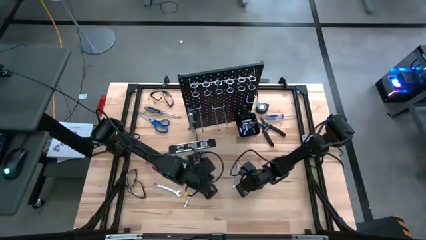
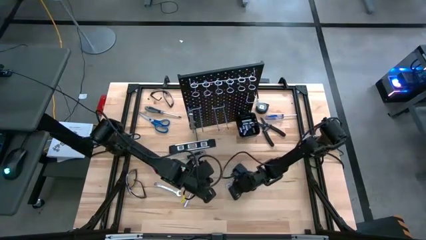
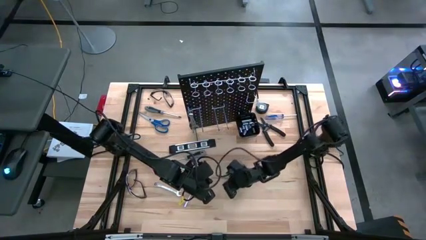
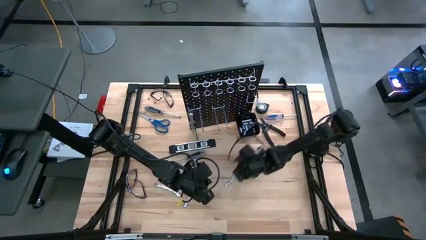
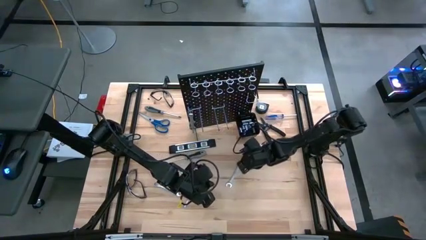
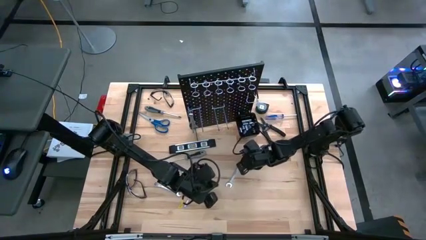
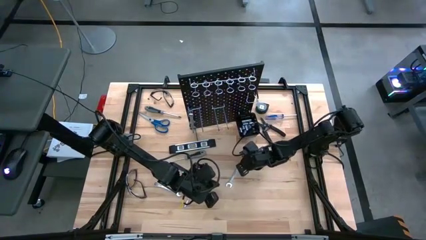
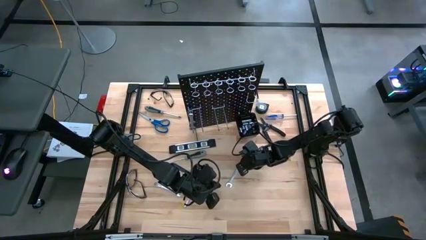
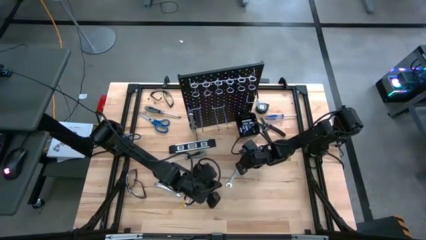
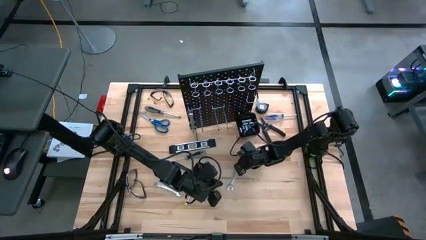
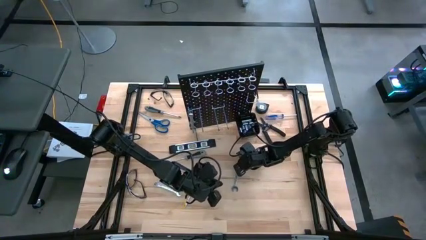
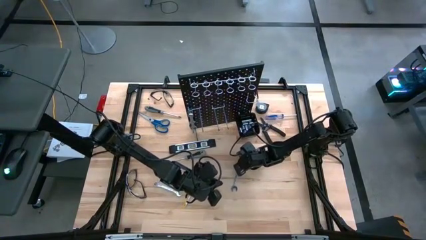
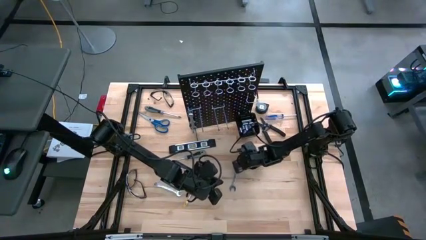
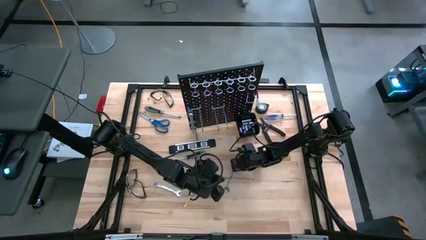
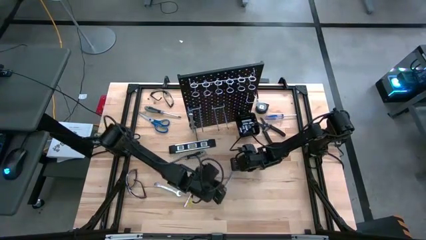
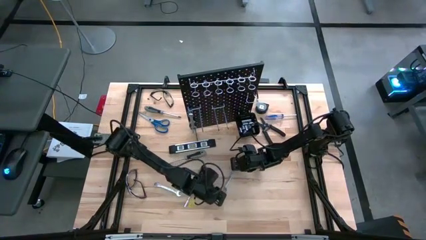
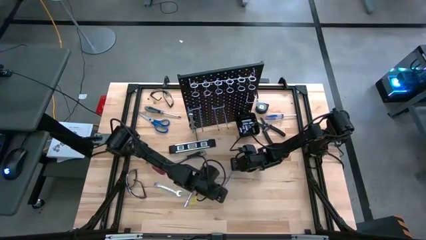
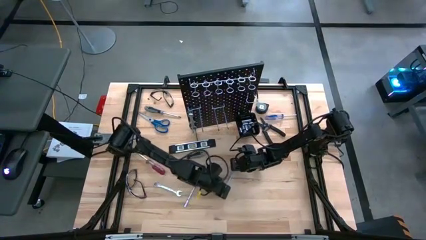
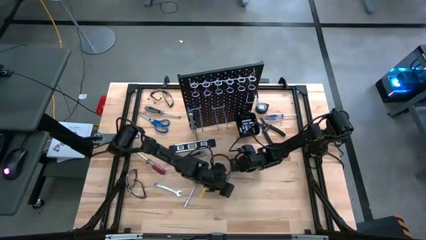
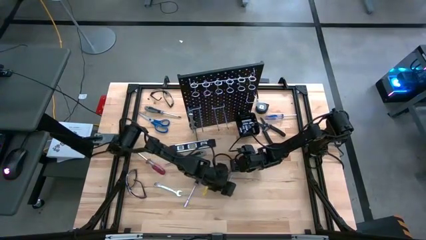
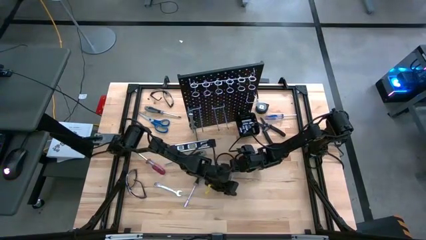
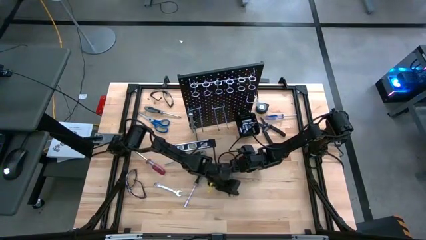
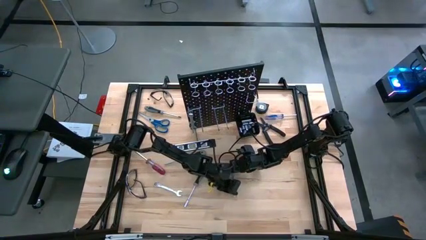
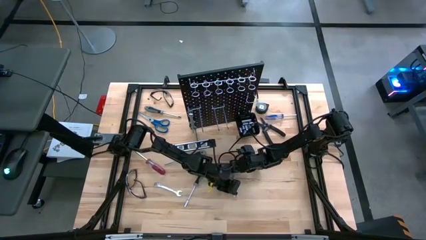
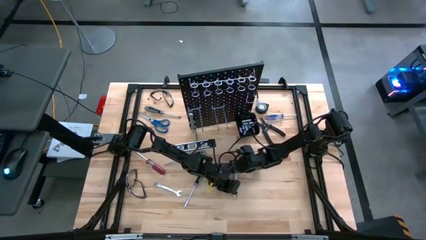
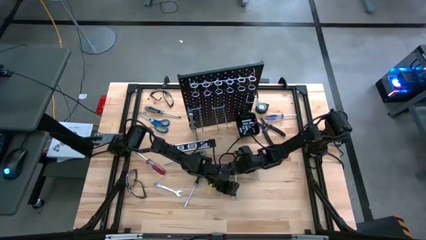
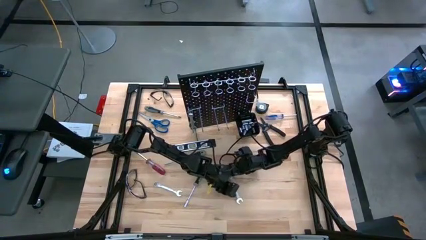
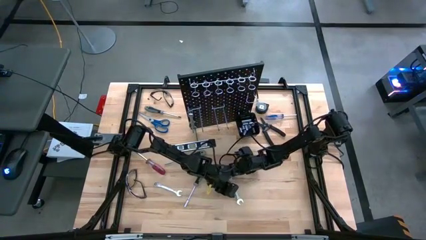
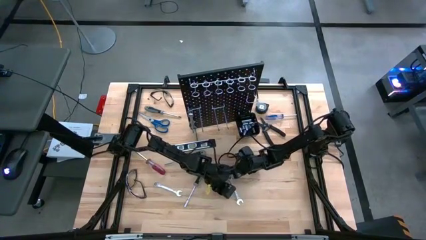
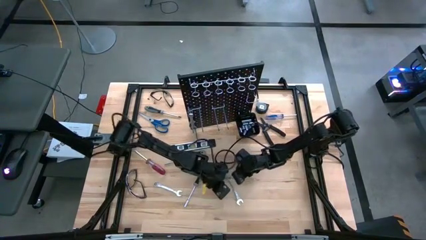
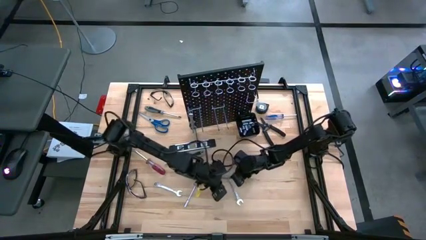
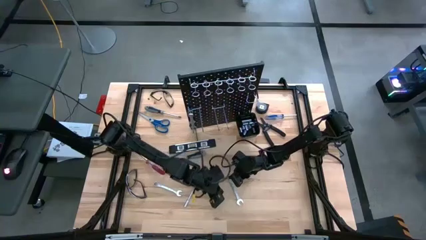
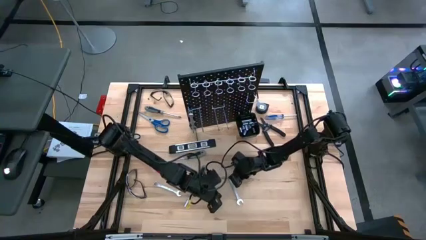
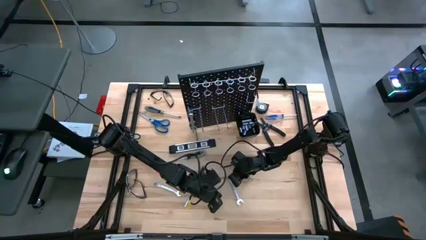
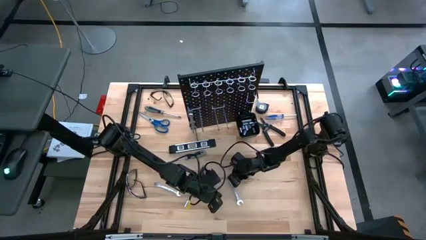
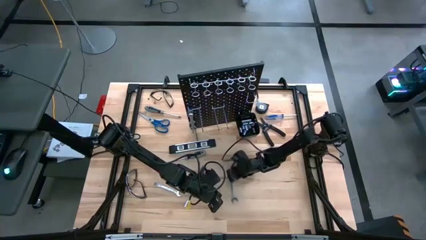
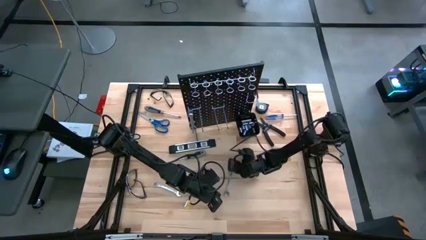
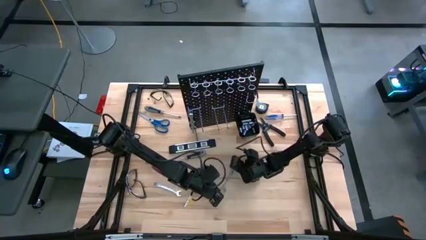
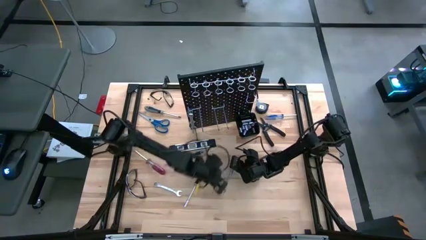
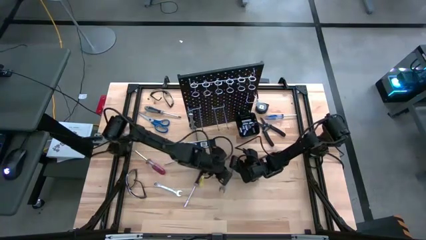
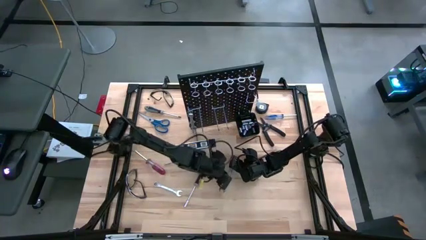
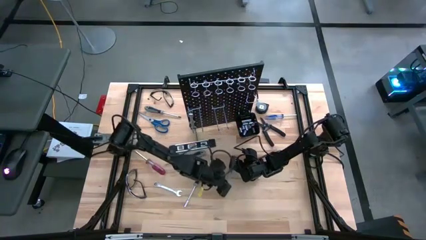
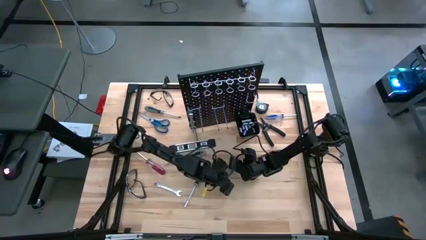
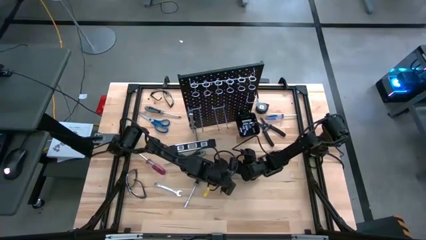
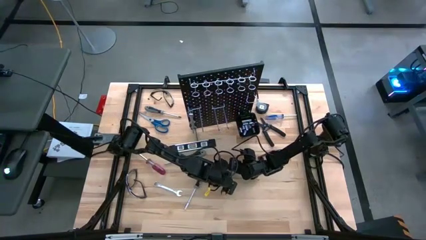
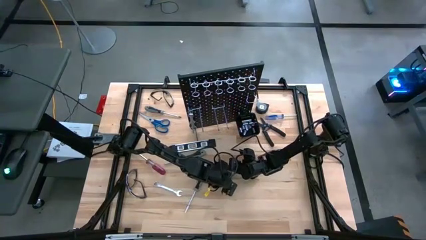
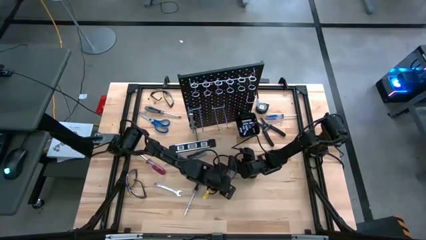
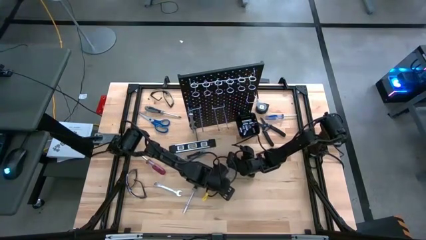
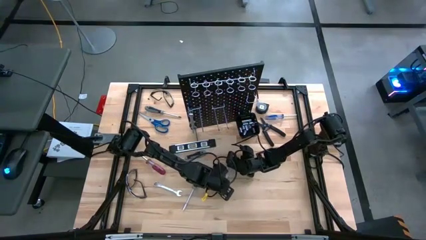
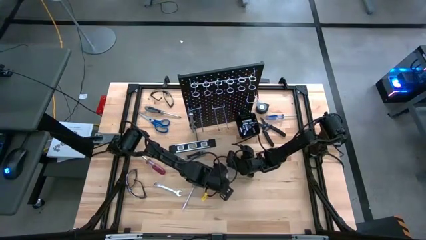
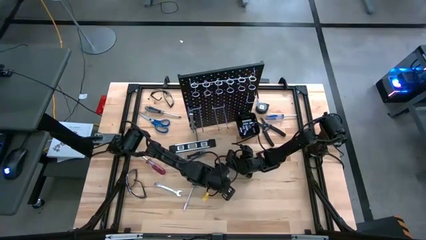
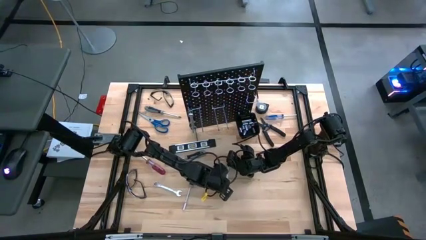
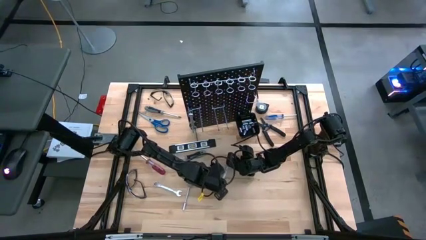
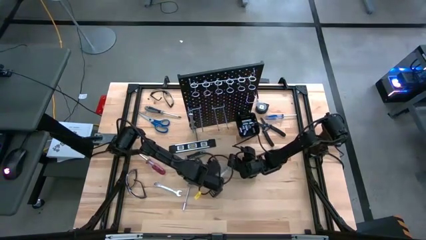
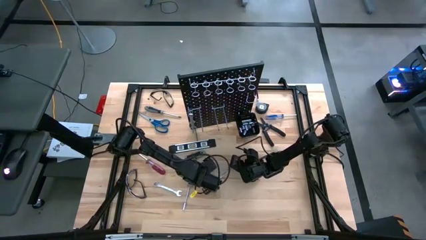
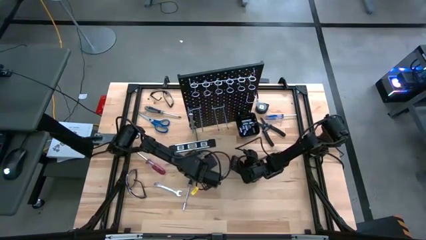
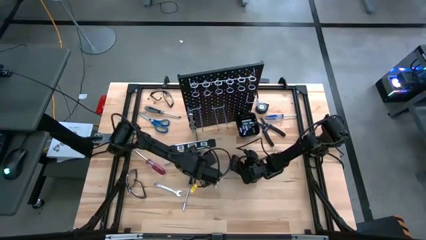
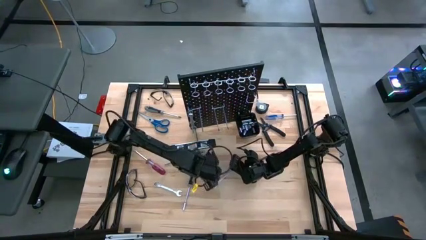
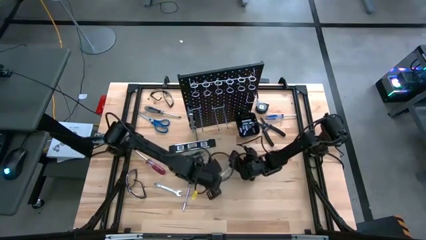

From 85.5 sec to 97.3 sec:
Task: Hang tools onto peg board
Hang the silver wrench on the pegboard

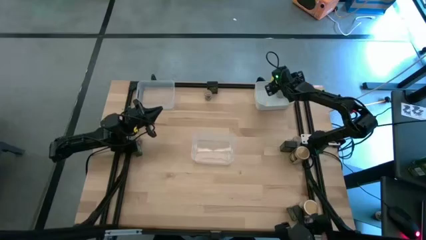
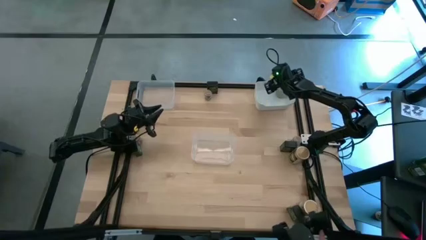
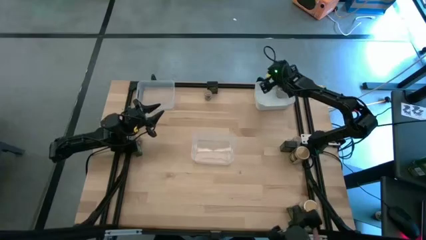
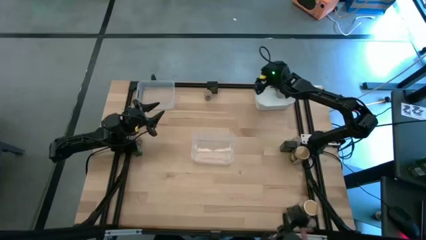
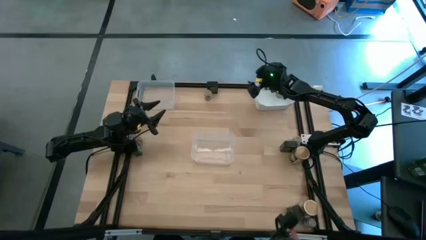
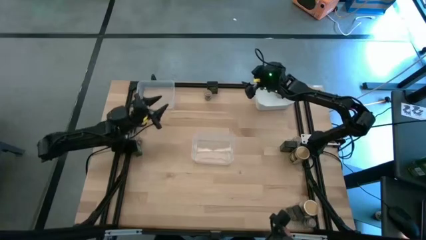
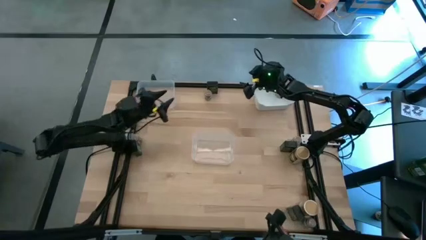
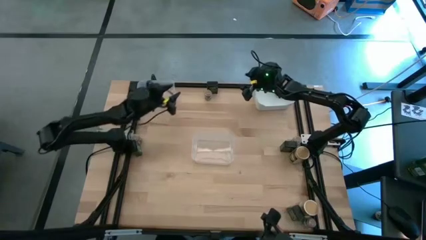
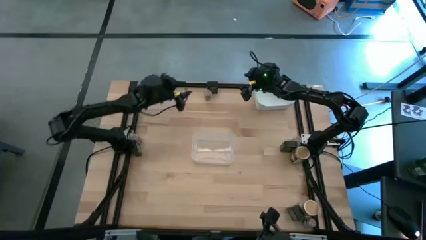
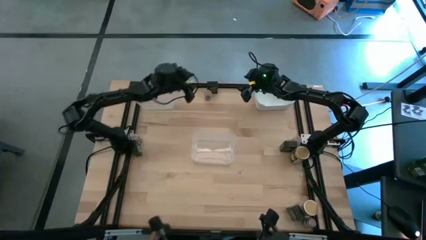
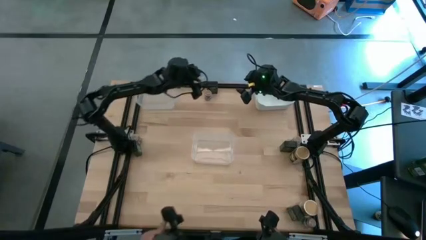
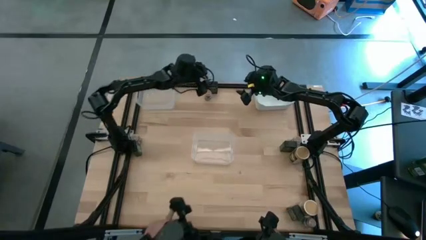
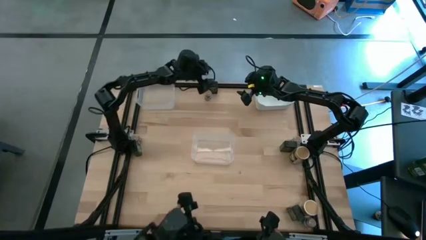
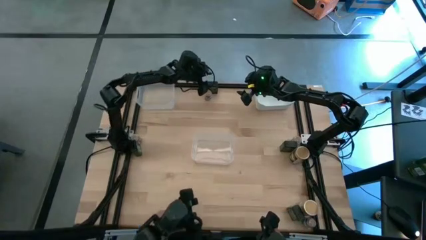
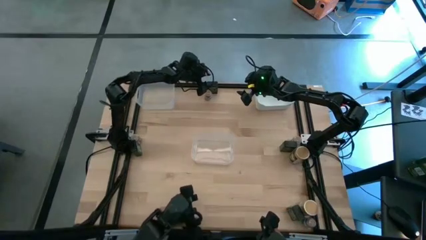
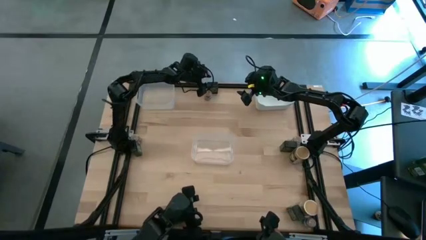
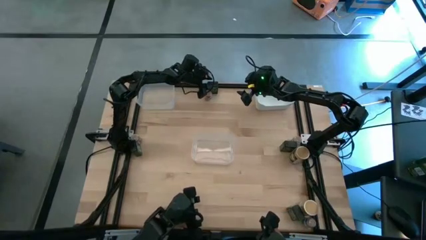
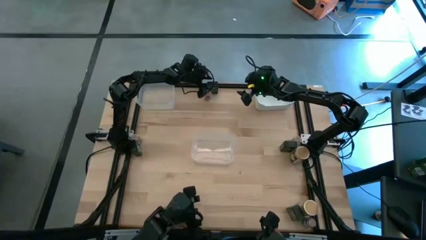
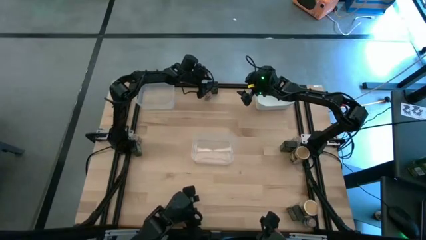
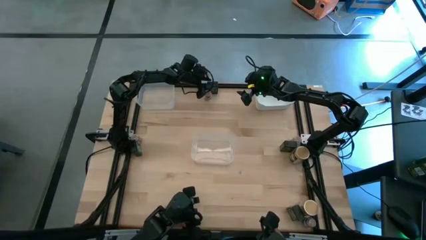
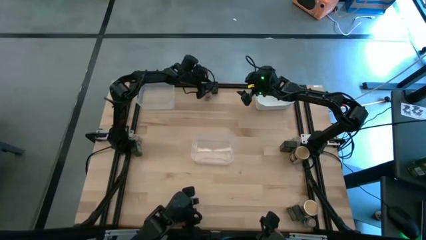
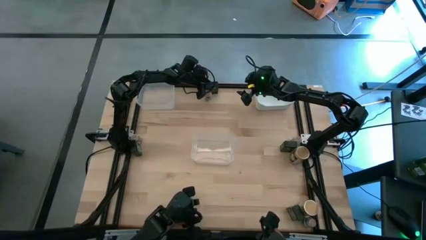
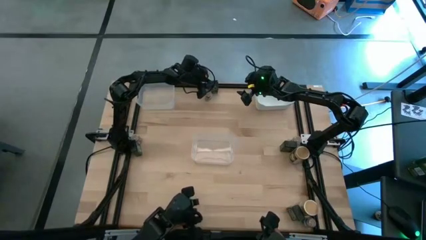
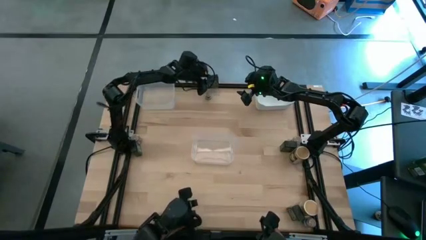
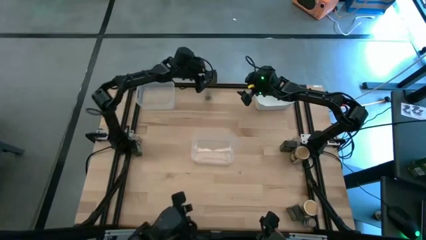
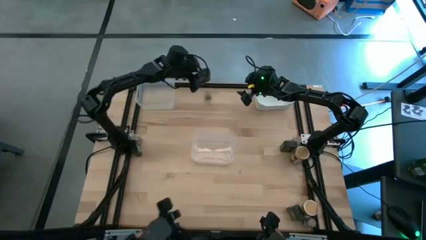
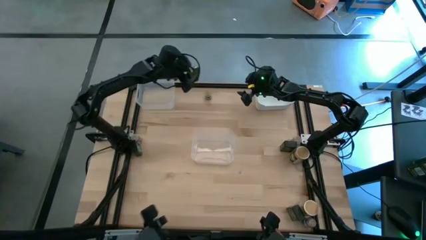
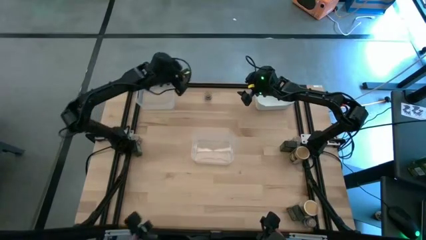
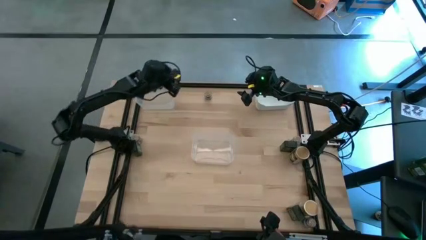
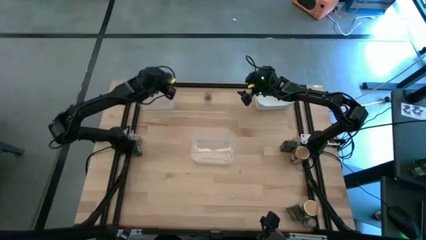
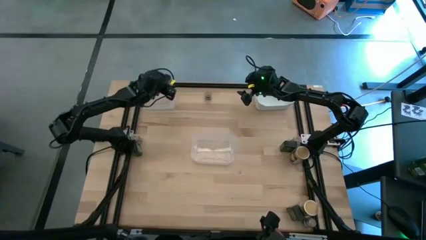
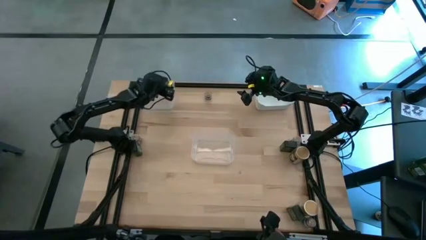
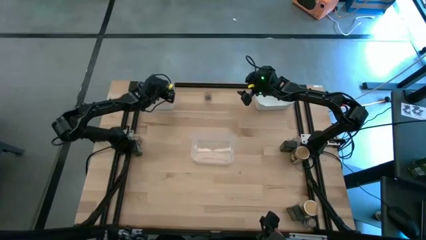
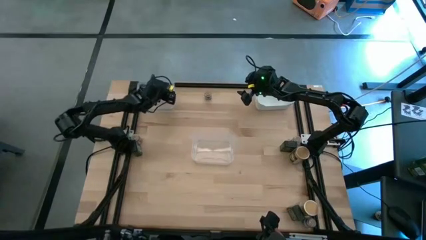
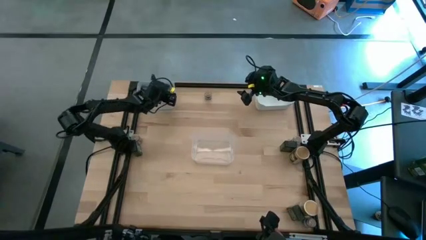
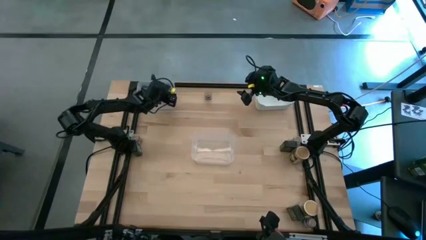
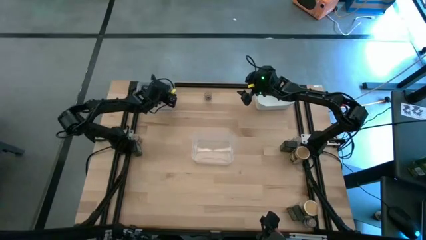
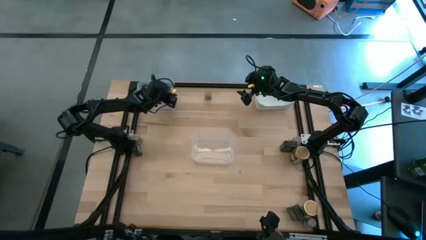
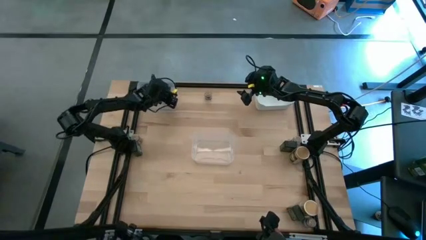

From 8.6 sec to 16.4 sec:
Task: Sort spices by type
Put the black seasoning can into the top transparent bin
